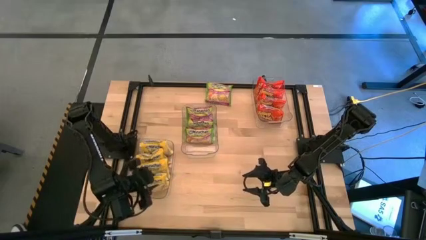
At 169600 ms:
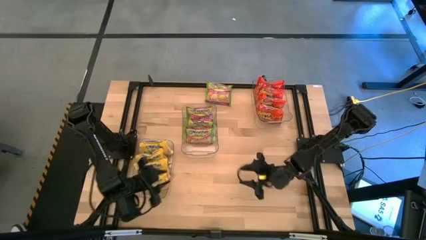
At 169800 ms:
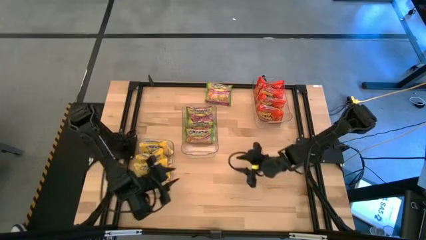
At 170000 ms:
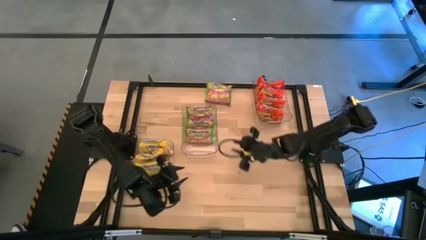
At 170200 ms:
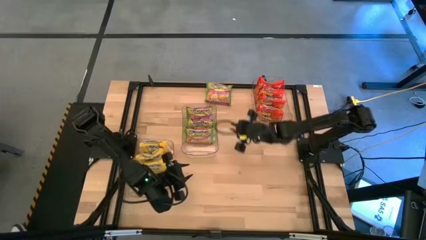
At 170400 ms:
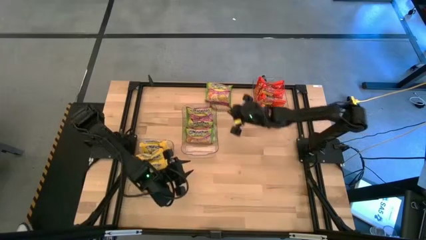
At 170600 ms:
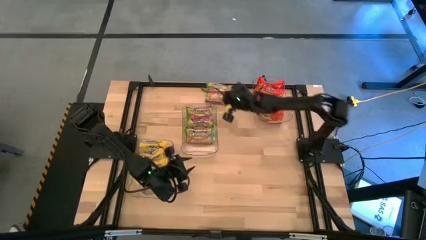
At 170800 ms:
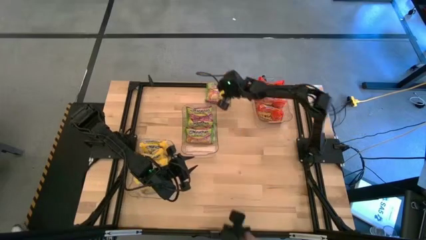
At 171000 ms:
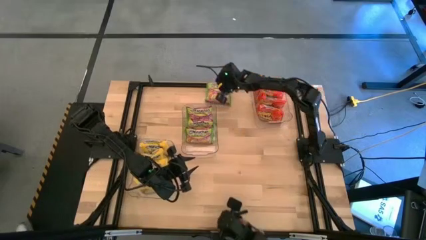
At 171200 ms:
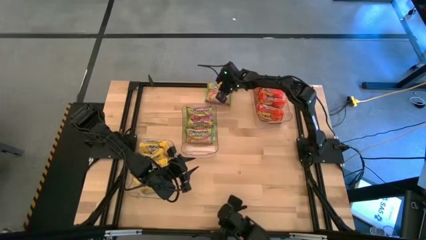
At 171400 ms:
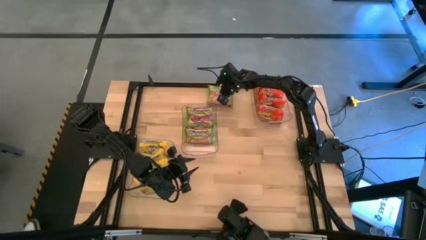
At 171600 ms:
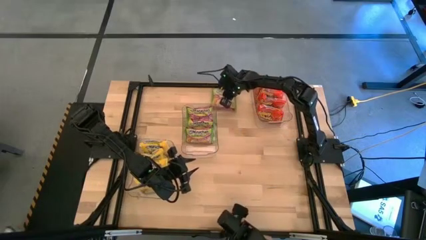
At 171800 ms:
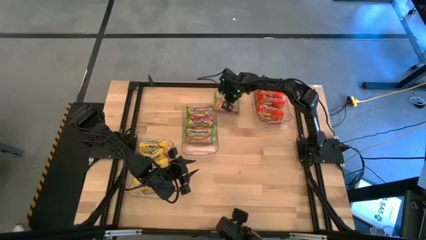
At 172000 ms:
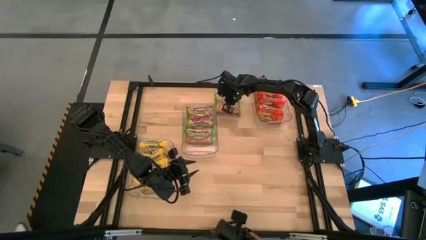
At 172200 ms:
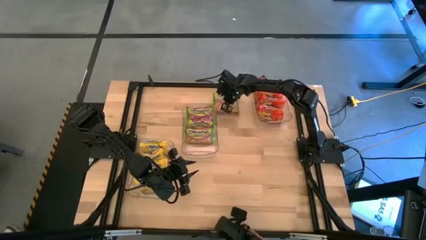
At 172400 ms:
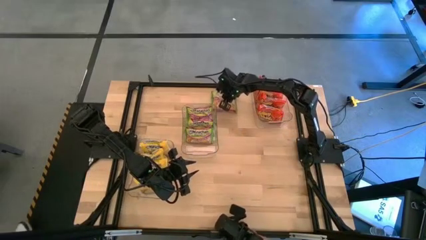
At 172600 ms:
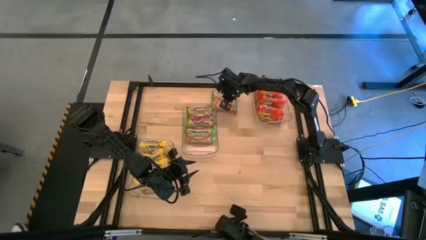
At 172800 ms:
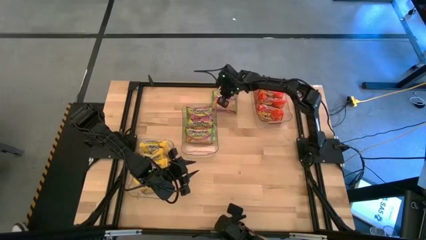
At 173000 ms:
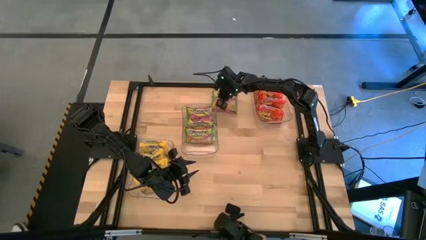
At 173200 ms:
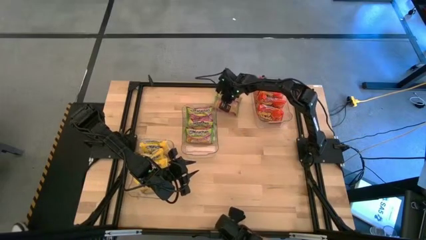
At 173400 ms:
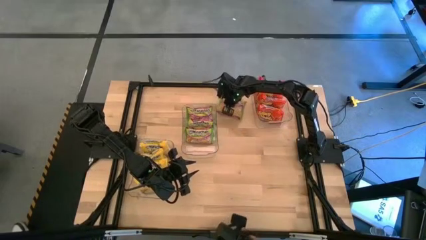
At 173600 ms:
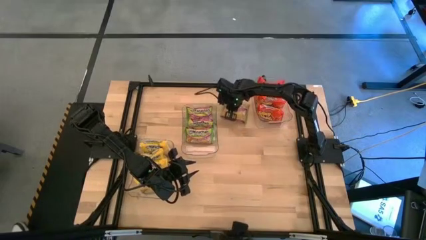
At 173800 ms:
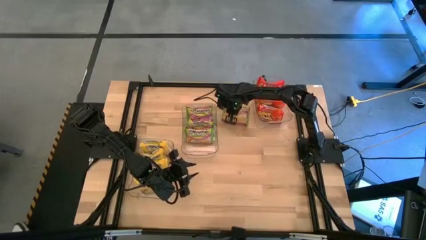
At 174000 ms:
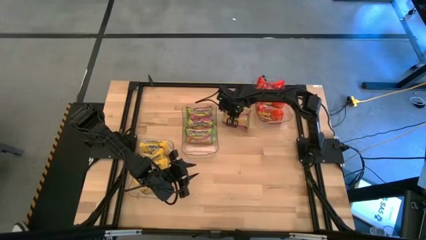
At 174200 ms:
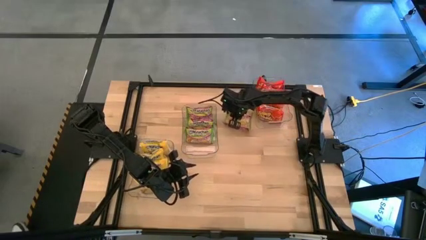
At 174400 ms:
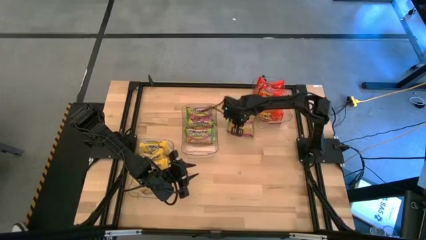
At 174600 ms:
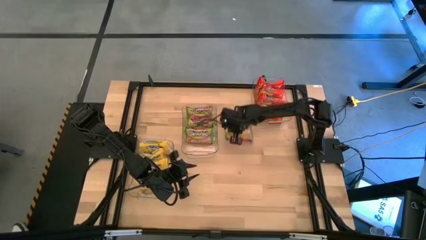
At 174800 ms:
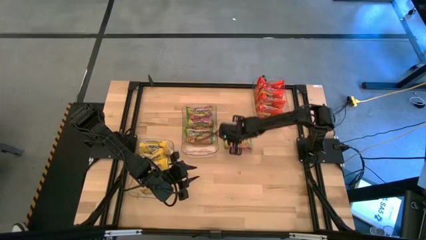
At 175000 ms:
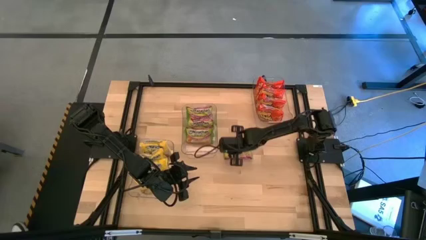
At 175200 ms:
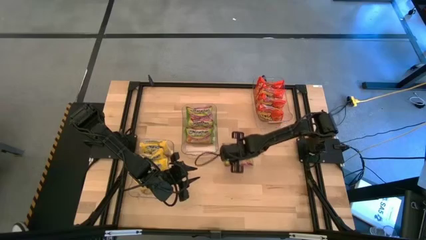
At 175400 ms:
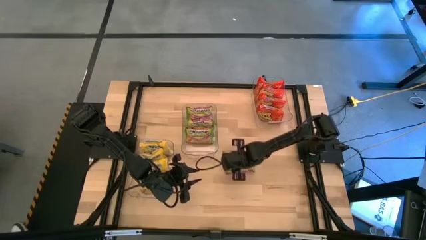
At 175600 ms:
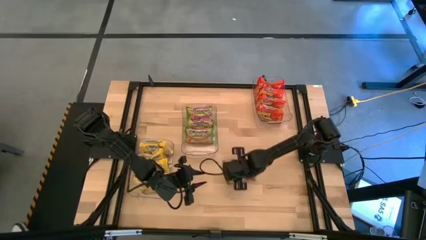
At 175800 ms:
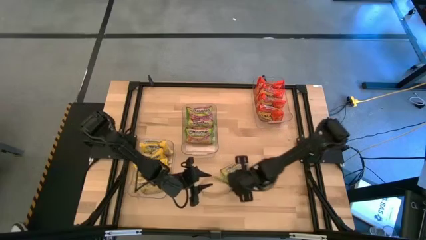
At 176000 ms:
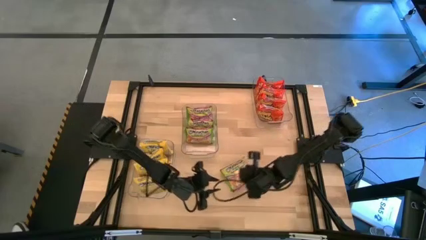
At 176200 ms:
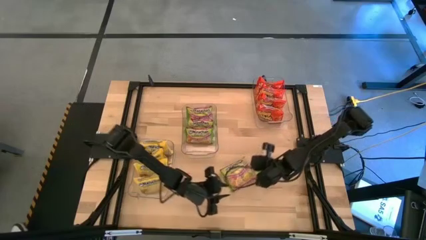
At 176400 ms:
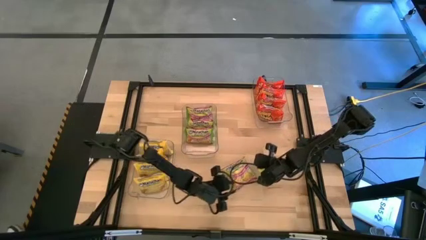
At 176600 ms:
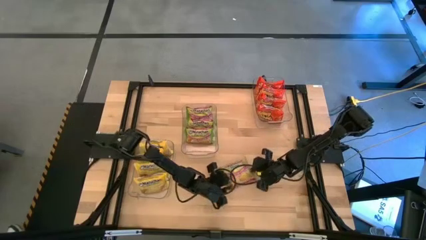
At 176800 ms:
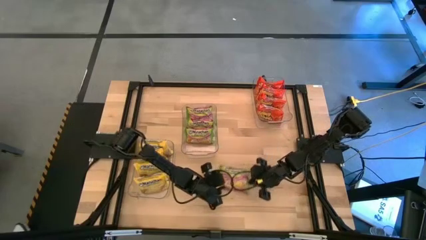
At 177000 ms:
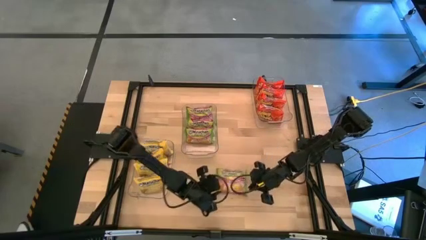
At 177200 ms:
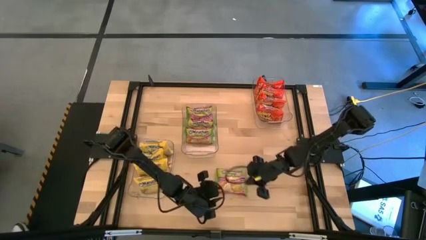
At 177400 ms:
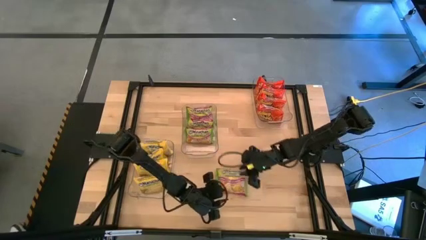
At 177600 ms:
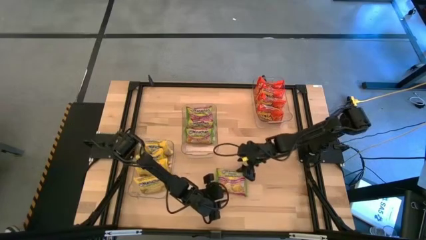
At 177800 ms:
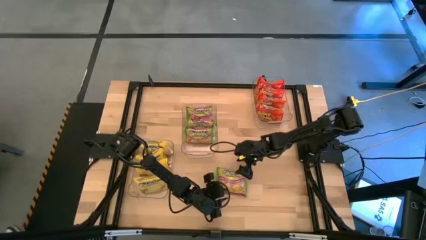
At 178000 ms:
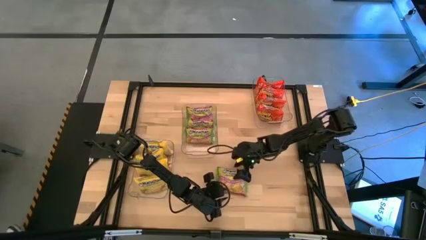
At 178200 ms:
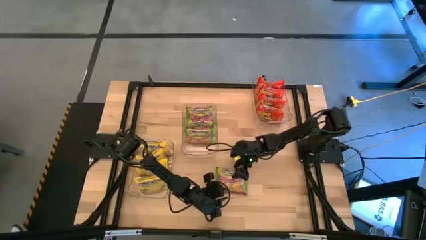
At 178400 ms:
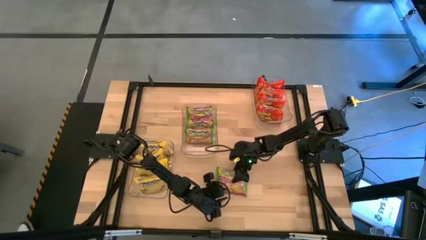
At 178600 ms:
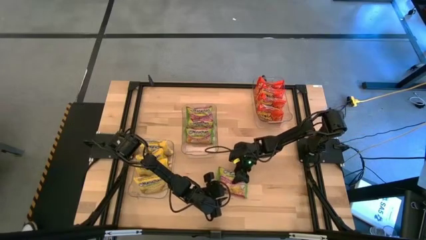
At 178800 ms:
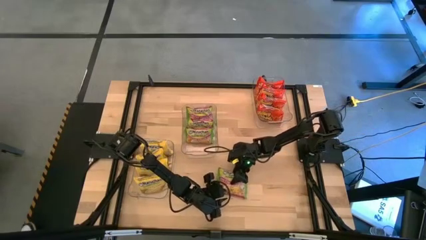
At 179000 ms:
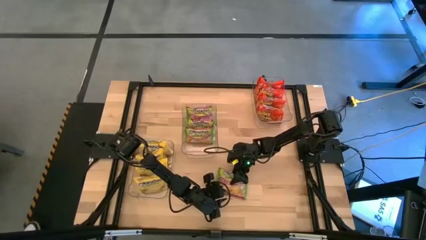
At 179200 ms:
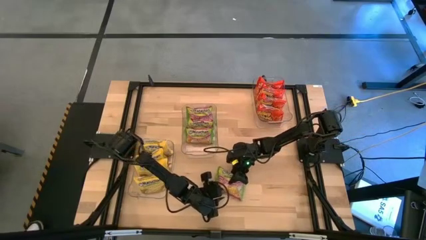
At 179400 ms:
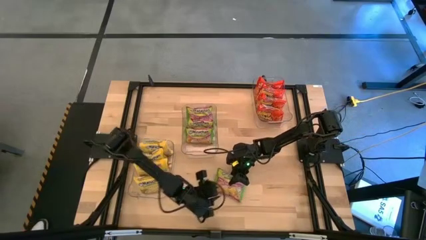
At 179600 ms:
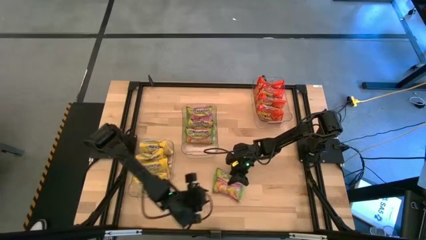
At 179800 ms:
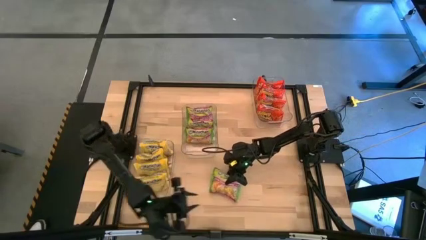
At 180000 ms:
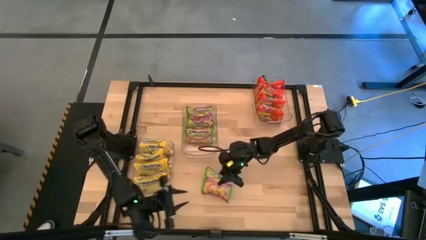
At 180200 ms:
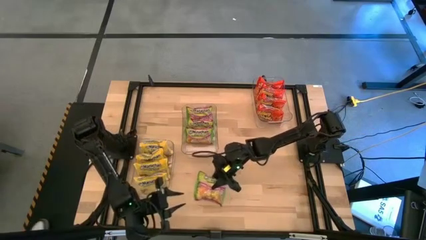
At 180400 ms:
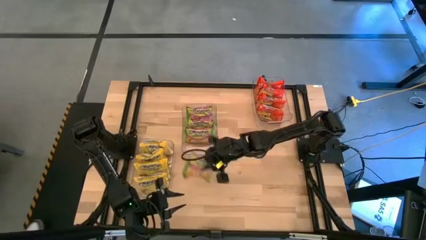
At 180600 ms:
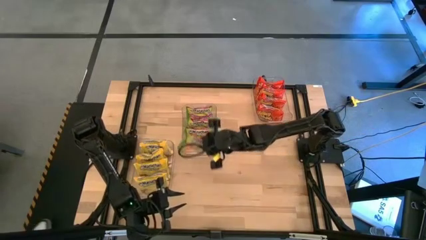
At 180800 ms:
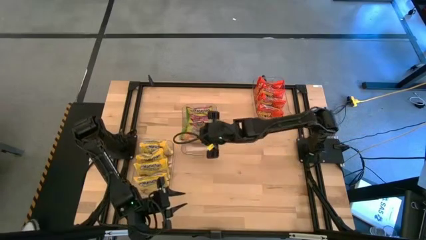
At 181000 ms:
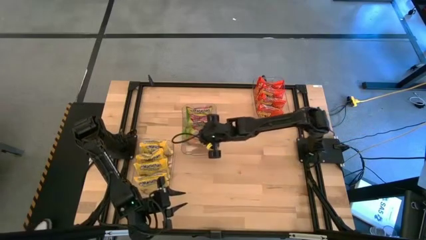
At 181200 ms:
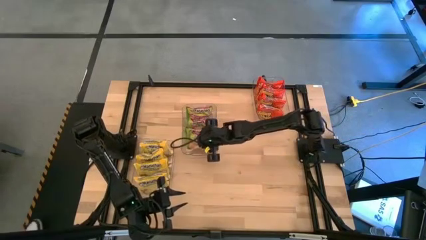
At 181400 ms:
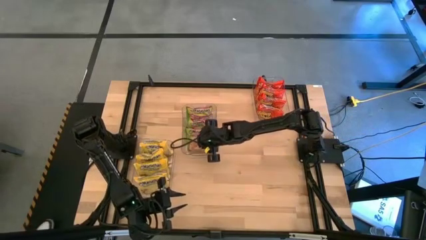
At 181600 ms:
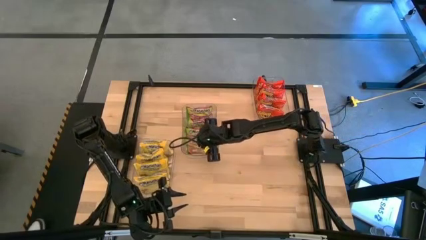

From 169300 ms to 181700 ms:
Task: Sort Maruchan noodles
Put the green noodle pack into the center transparent bin
